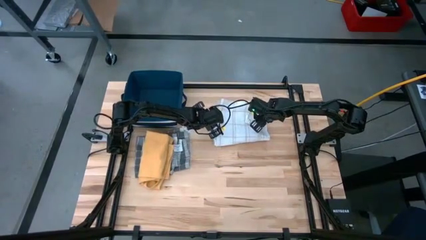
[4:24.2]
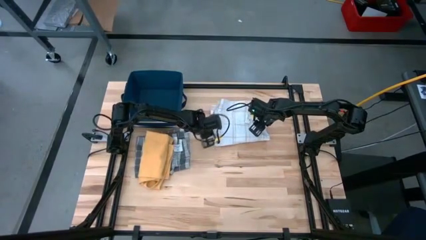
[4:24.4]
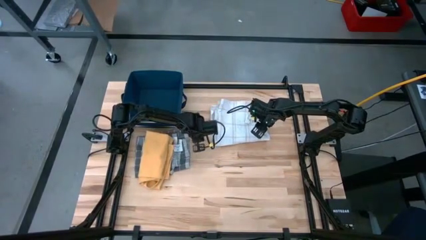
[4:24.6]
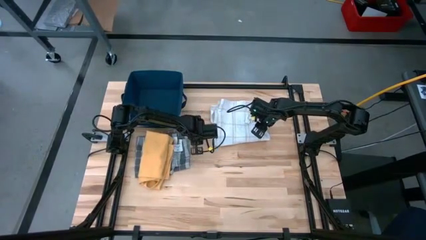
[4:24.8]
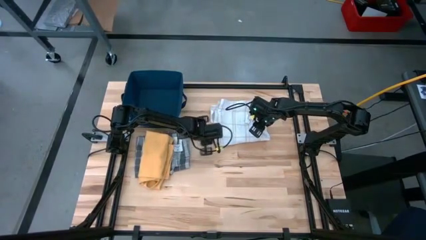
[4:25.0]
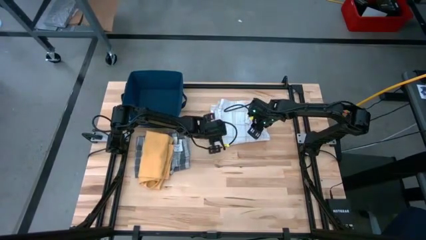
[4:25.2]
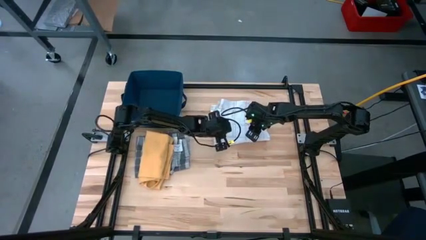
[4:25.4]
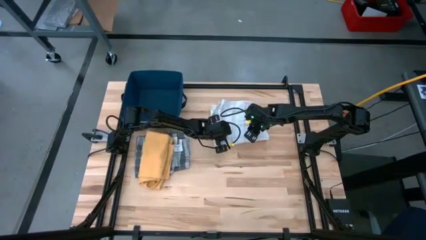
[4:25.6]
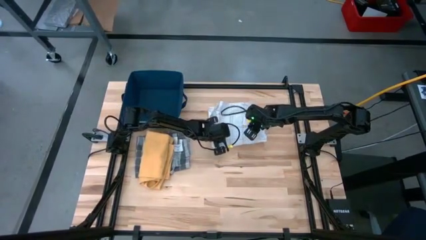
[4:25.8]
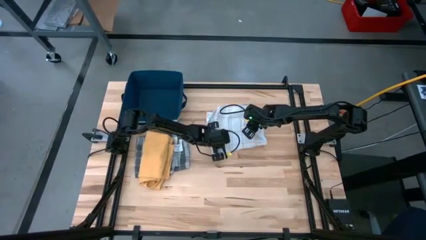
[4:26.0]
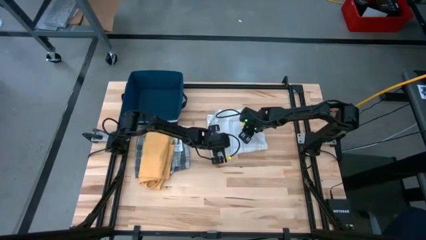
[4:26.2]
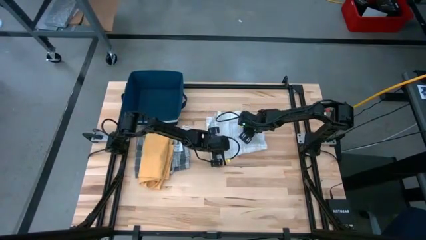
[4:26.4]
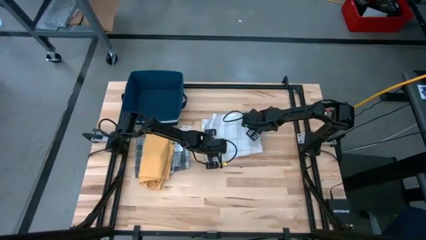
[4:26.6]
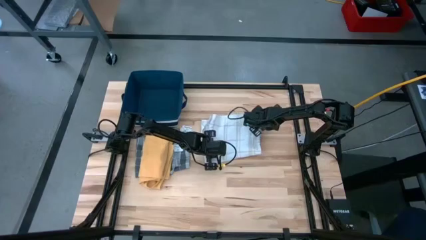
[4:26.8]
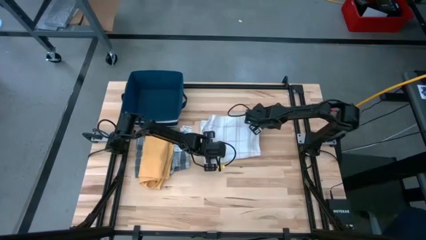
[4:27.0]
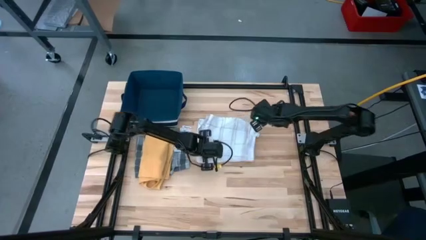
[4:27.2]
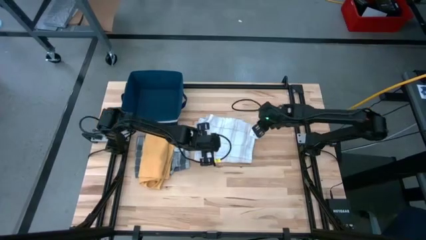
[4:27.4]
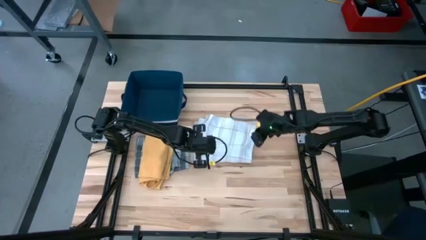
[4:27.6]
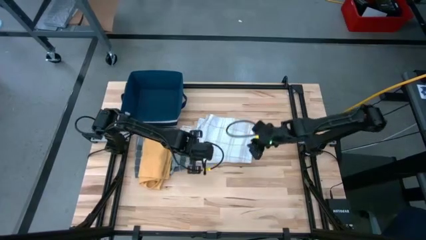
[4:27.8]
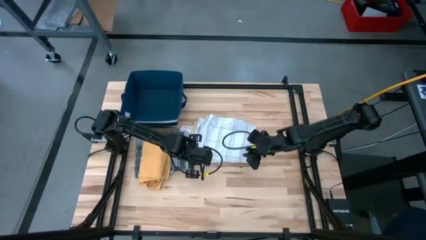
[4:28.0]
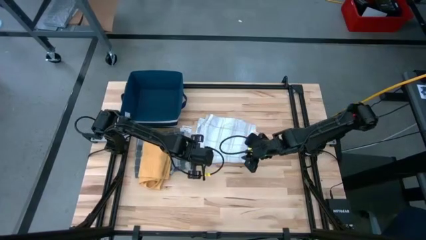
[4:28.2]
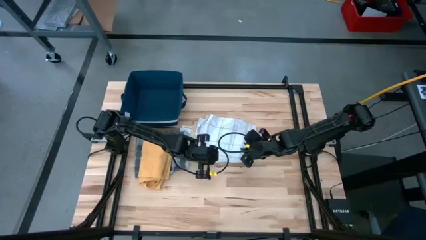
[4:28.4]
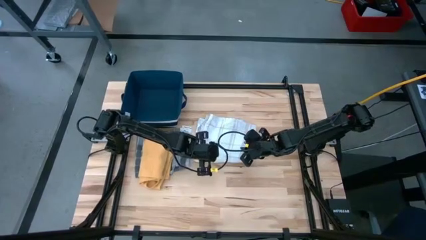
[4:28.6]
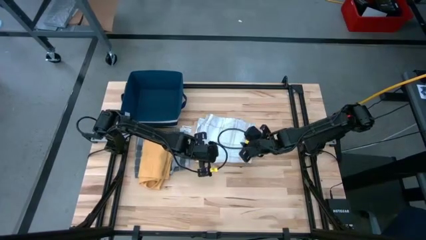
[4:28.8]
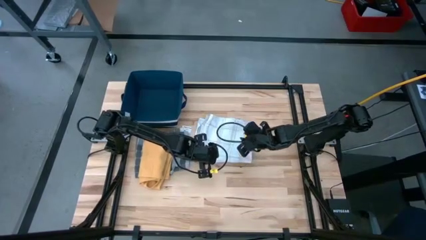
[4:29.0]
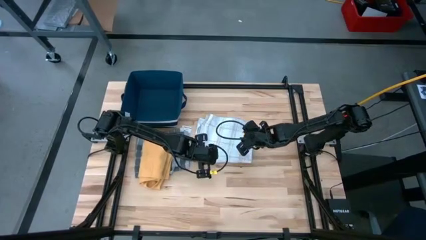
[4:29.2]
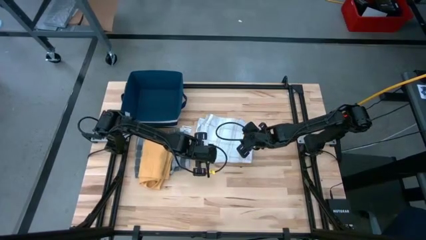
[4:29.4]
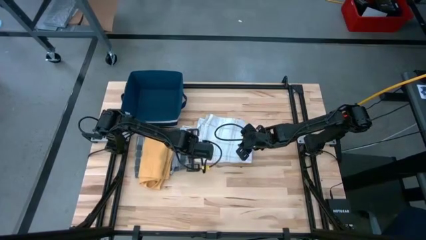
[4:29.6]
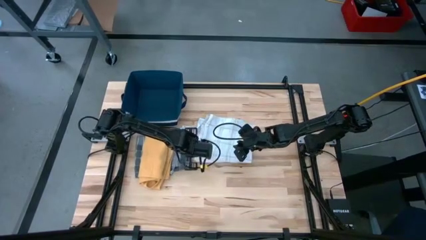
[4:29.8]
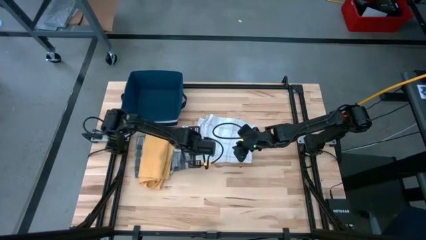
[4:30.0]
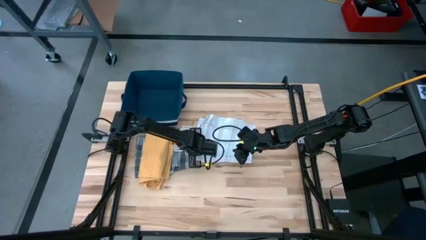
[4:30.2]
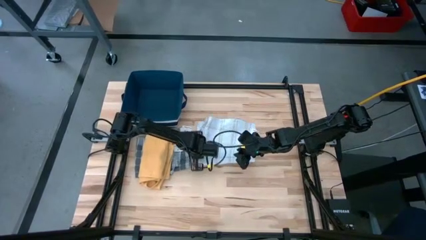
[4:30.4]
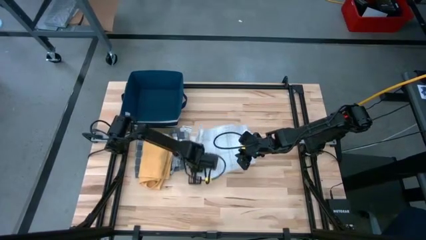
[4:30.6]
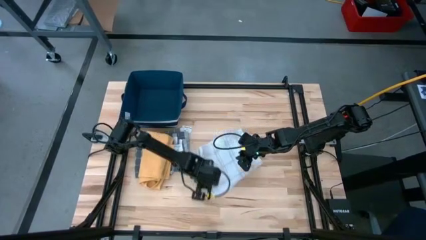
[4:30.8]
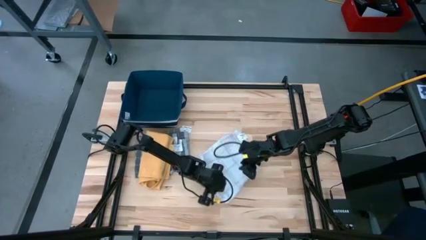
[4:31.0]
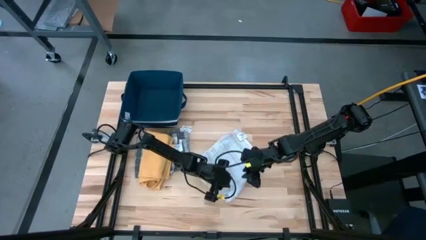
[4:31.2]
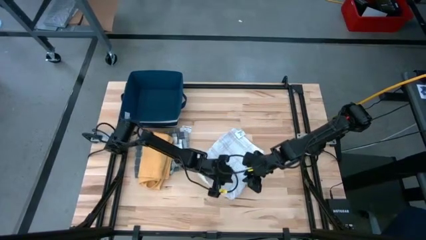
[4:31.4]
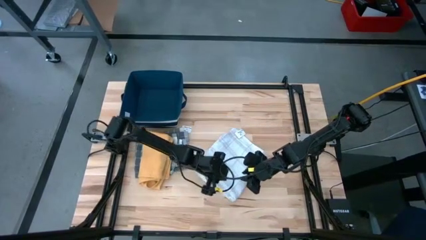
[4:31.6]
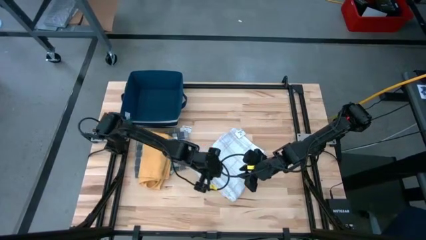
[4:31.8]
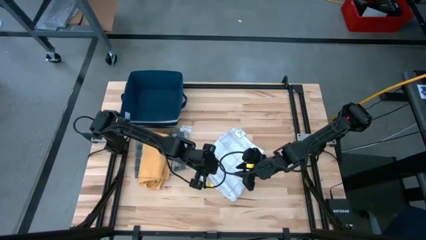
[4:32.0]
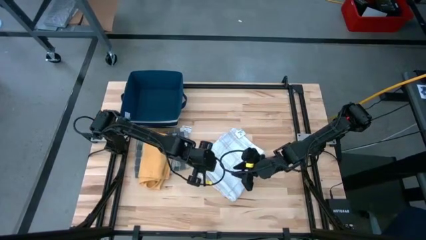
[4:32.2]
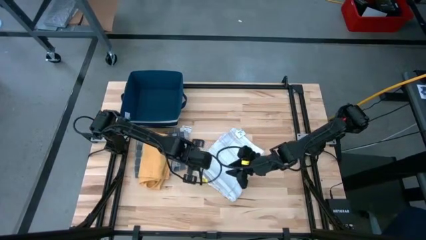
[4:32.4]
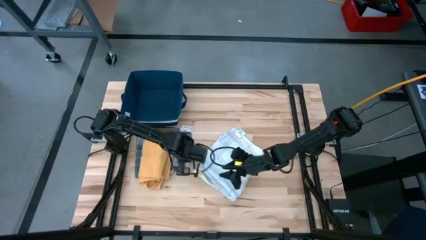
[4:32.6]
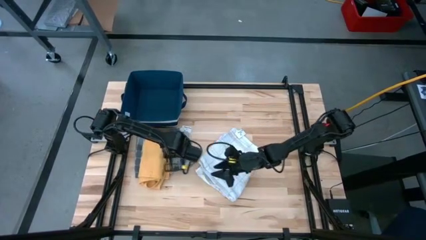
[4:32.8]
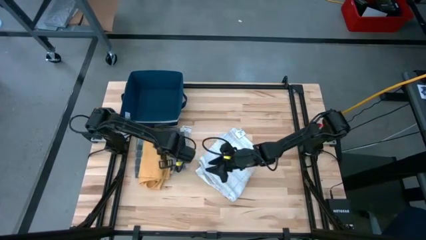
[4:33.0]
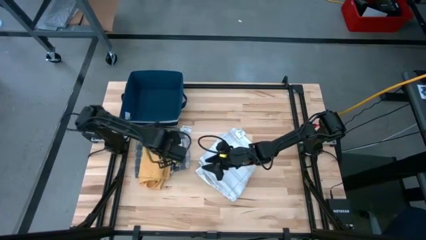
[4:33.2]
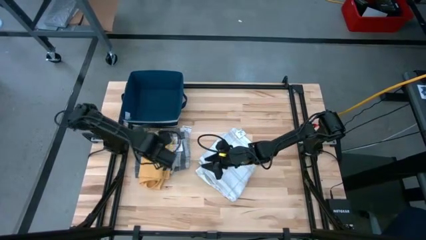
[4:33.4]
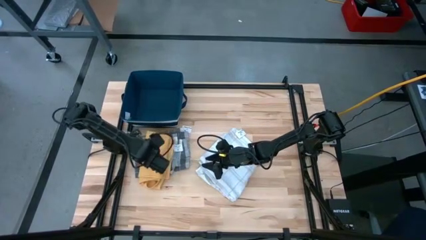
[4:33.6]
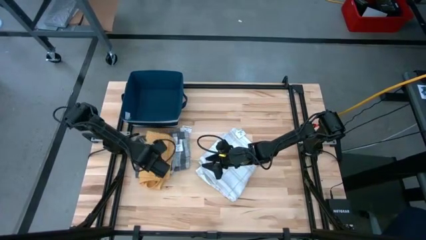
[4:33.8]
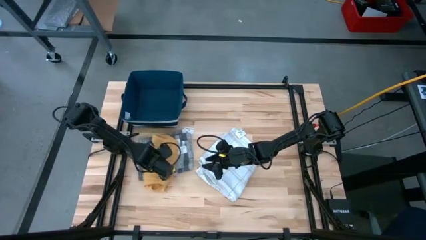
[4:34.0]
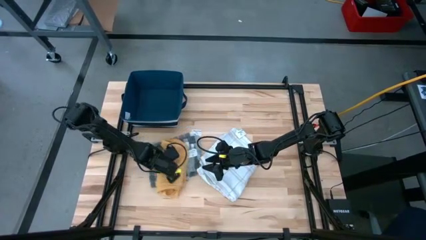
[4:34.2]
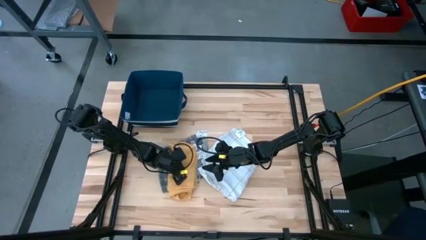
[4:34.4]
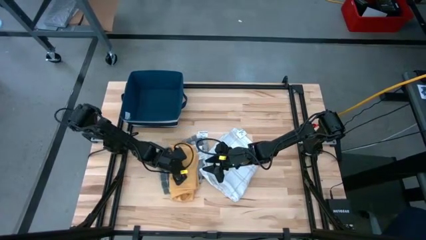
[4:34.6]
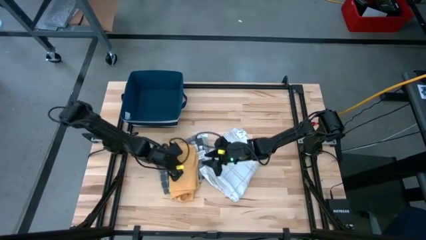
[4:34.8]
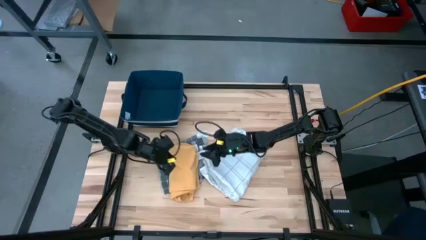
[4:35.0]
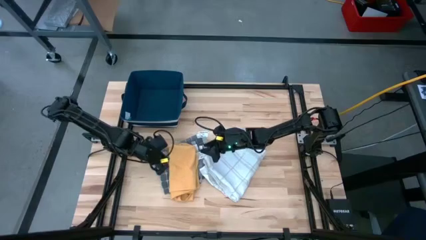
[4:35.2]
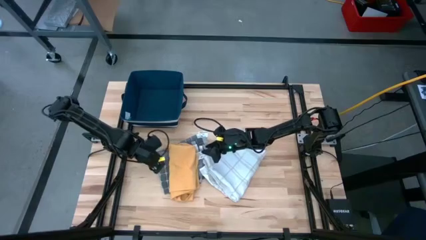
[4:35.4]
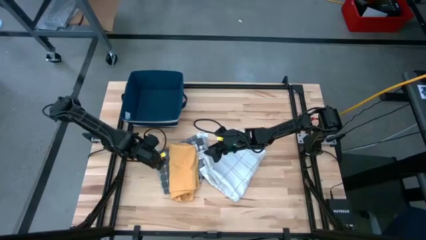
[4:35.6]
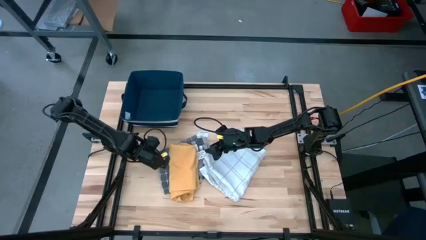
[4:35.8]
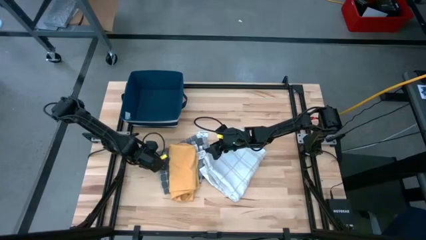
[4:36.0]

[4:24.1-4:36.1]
Task: Fold towel
Stack the stacked towels on top of the white towel
